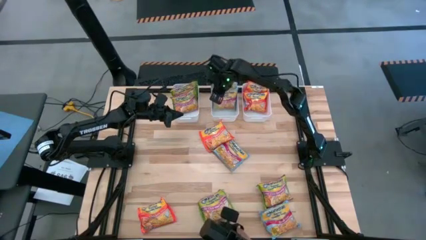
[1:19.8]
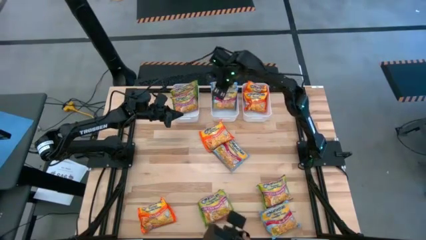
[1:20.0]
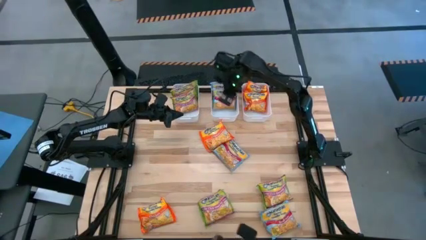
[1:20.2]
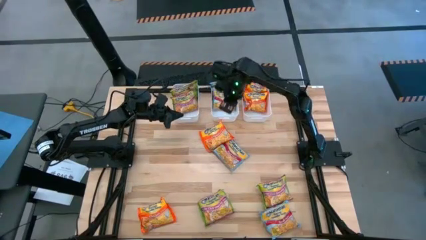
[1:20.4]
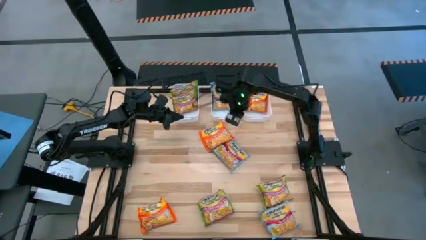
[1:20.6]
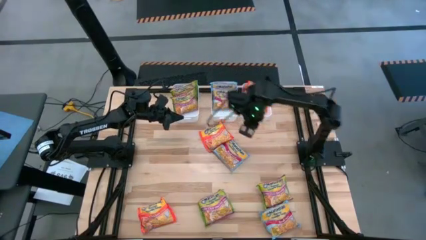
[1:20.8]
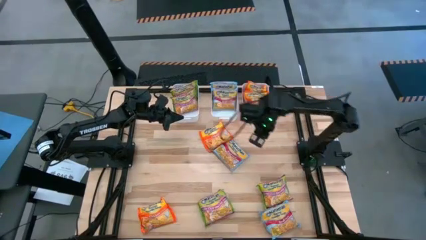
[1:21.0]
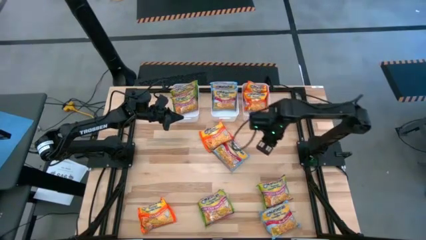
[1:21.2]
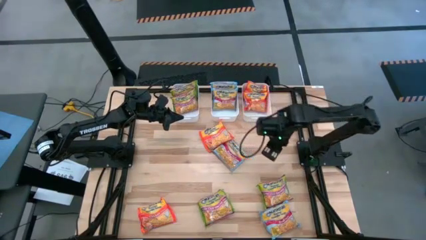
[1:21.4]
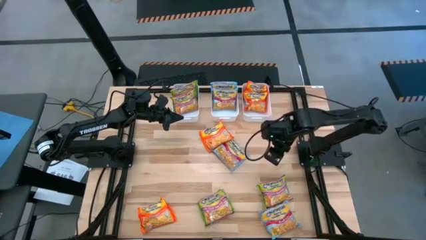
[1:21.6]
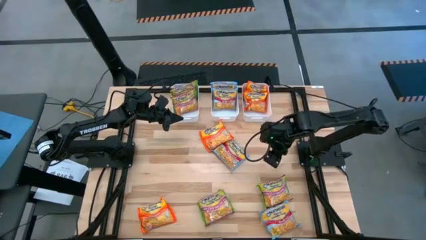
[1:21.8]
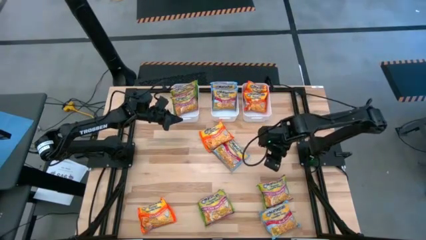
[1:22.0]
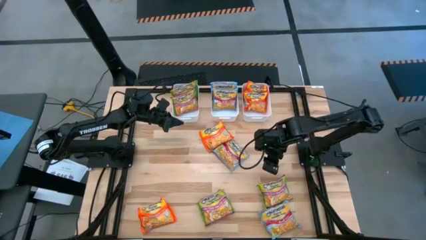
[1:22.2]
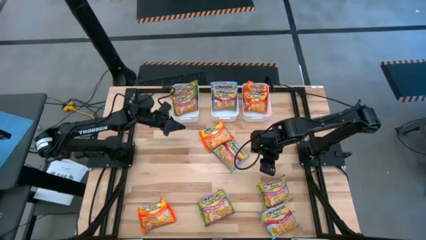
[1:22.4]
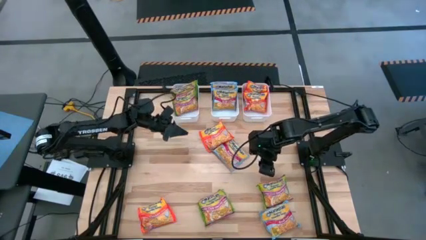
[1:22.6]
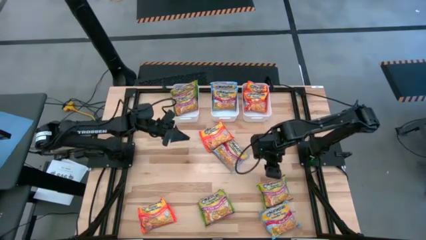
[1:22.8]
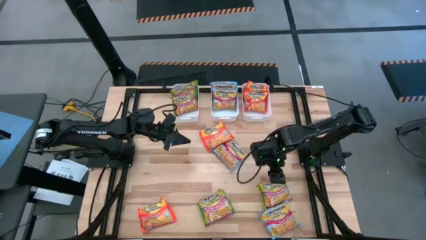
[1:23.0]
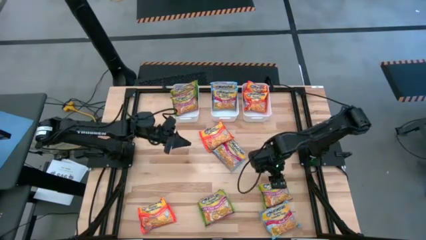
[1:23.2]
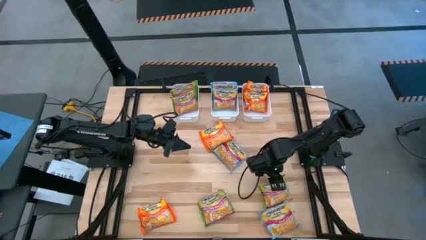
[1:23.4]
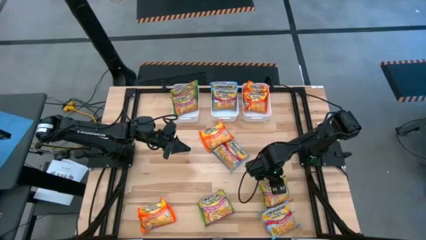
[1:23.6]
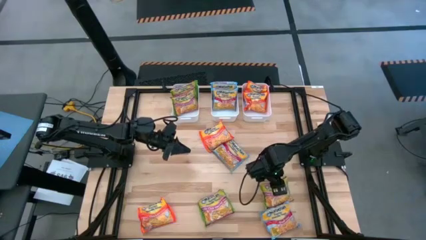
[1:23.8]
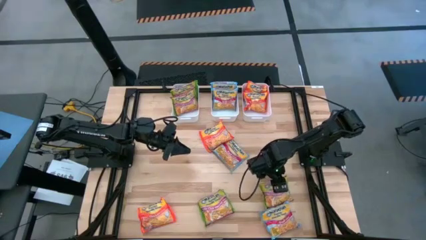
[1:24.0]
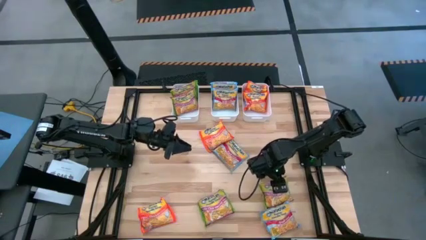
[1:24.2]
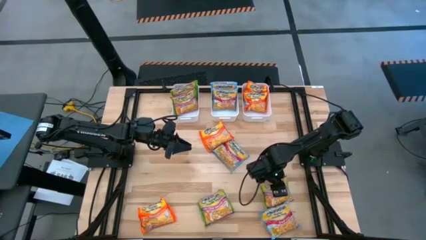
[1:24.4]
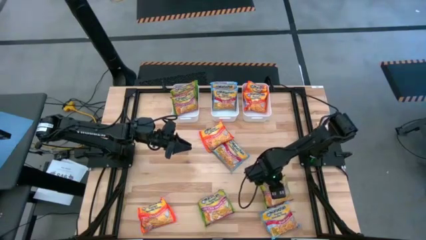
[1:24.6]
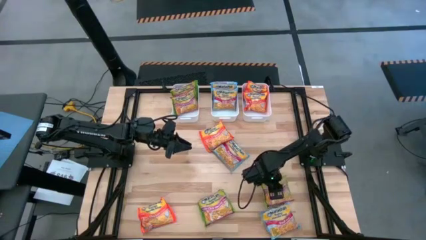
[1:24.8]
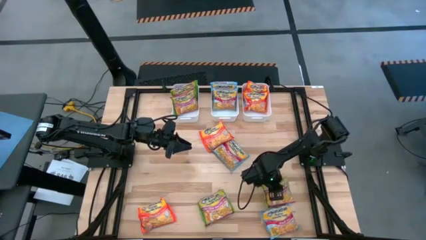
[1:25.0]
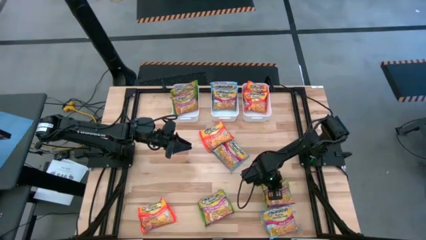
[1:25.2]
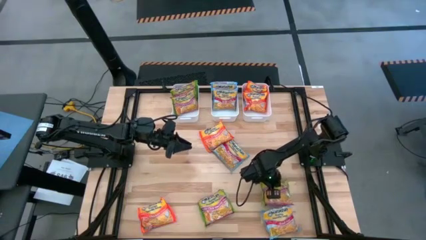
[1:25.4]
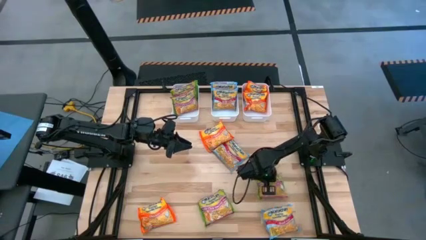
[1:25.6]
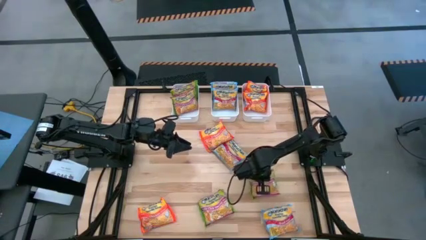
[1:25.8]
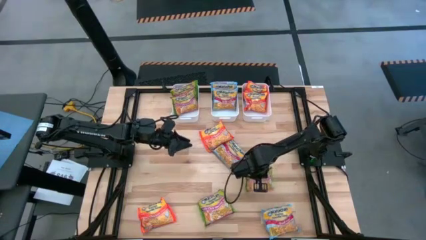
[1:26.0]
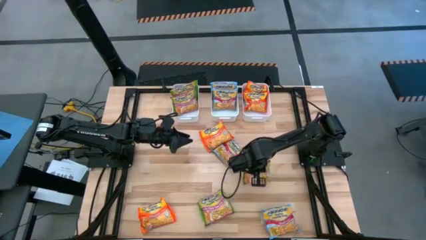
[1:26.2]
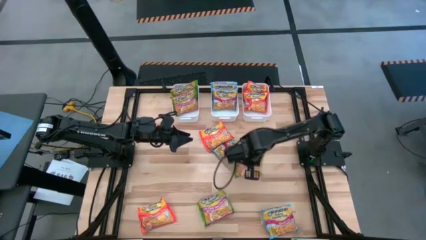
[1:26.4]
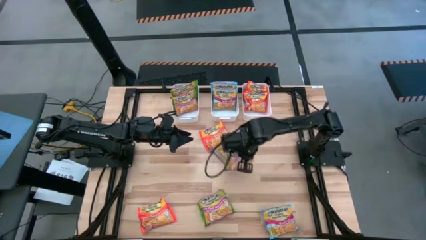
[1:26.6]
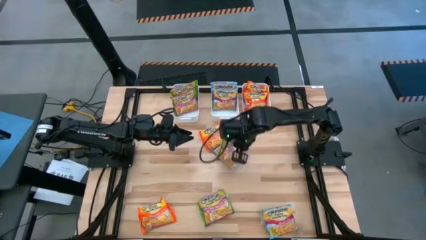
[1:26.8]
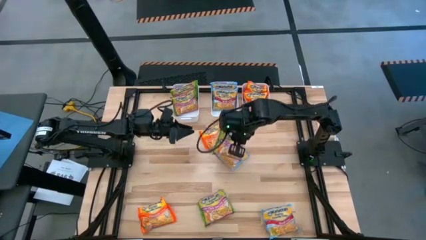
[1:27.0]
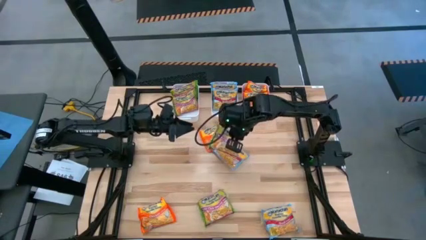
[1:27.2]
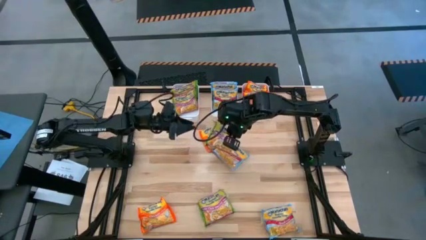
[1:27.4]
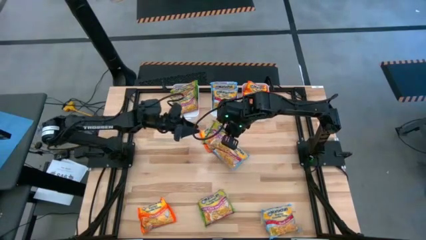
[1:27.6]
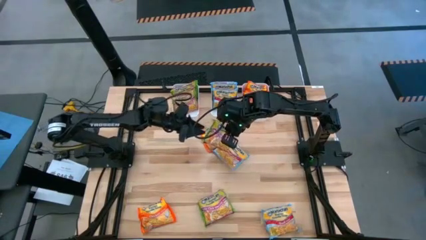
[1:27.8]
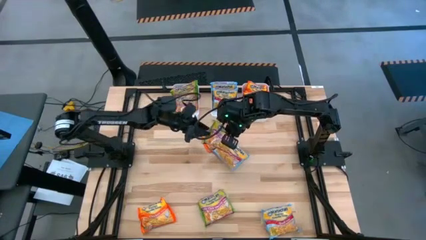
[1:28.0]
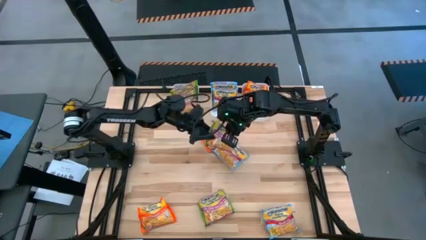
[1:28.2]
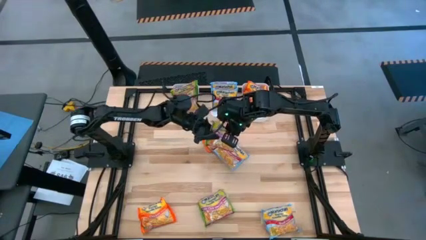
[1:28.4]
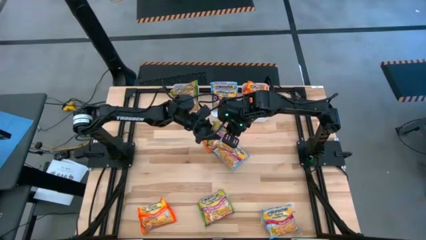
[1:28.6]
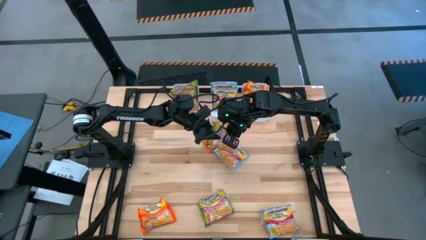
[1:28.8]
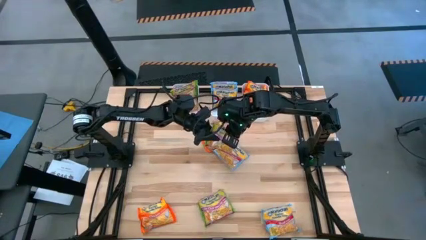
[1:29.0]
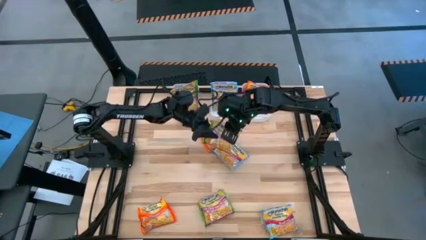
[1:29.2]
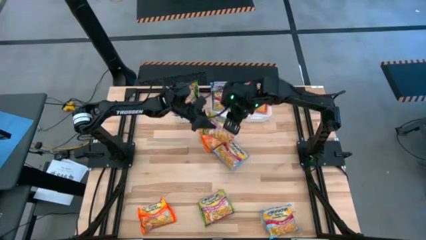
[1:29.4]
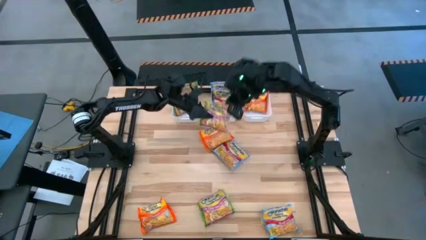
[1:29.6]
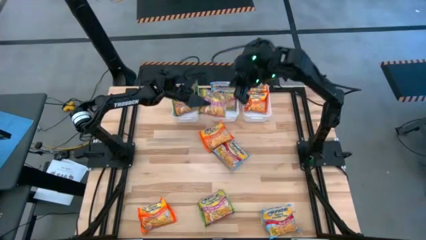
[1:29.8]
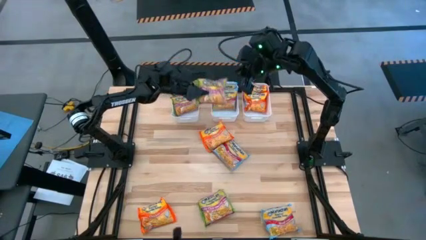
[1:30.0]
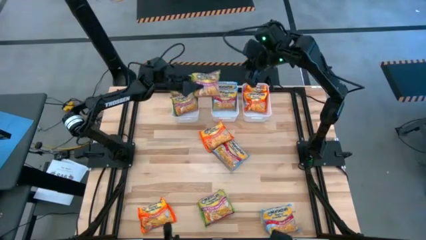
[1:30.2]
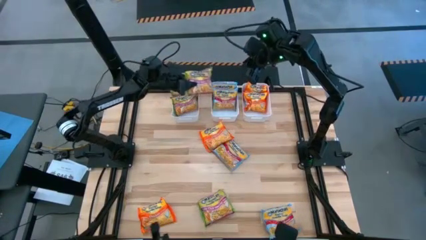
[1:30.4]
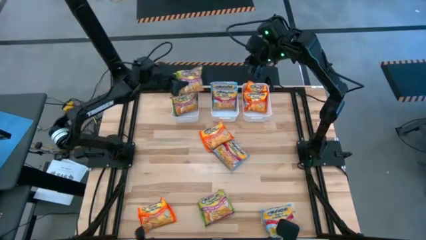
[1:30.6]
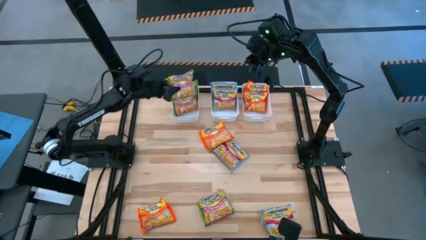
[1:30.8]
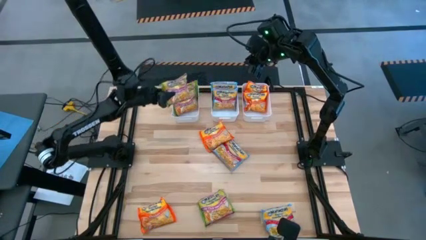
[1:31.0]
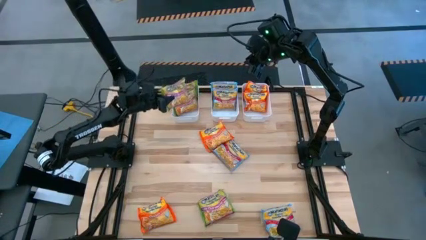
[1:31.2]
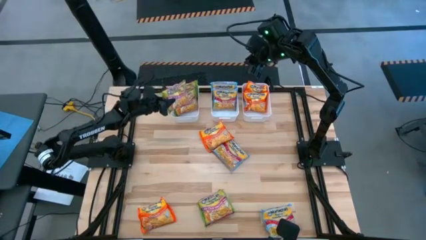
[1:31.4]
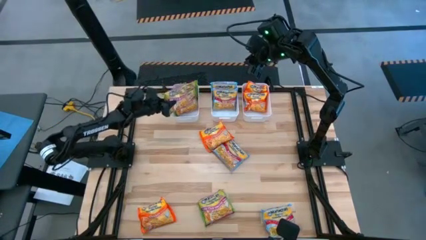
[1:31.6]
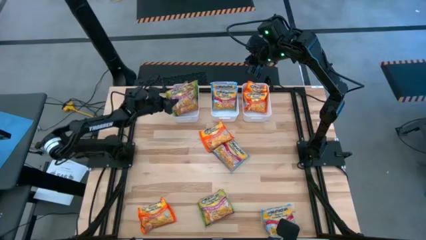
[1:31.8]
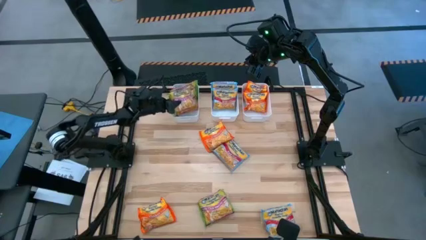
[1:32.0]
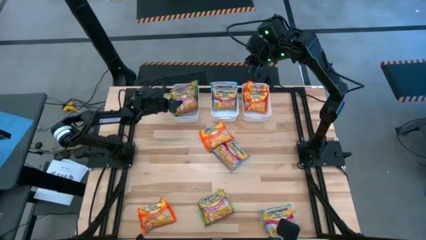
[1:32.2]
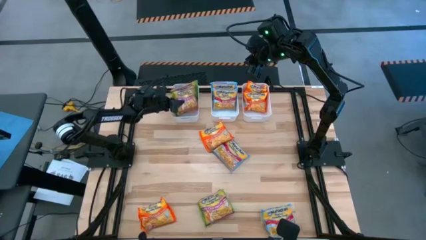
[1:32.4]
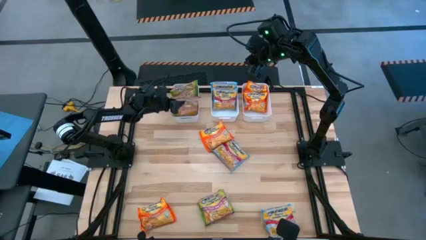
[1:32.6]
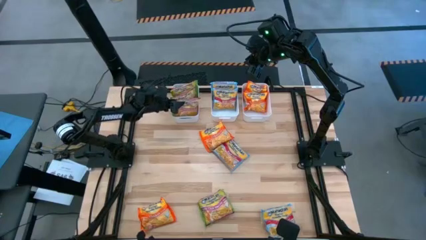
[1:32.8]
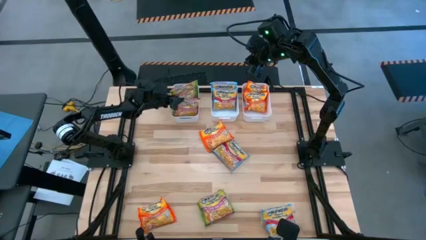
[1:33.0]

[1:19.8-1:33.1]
Task: Sort Maruchan noodles
Put the green noodle pack into the left white bin

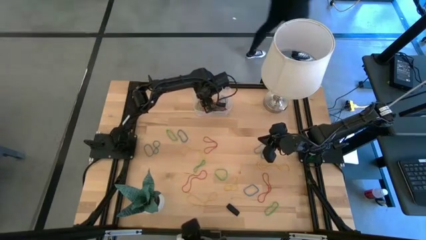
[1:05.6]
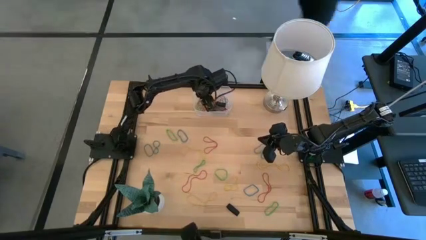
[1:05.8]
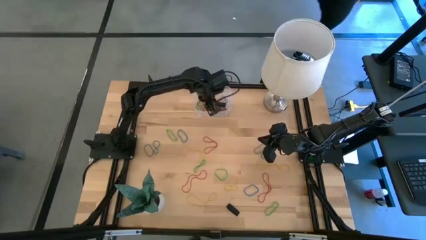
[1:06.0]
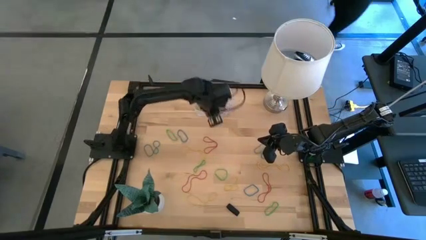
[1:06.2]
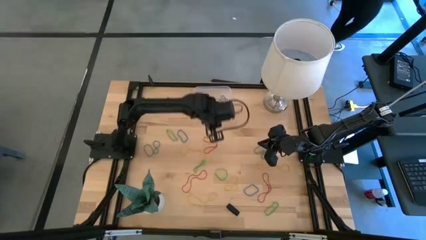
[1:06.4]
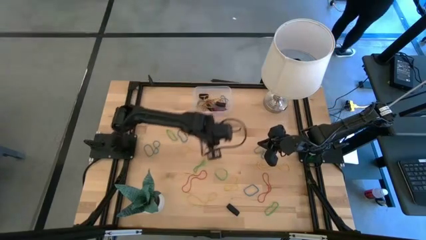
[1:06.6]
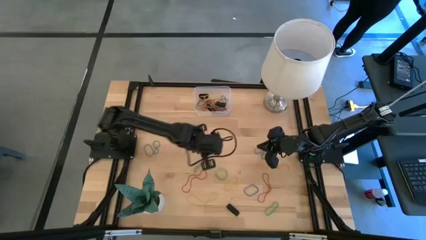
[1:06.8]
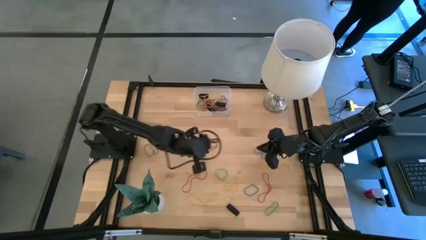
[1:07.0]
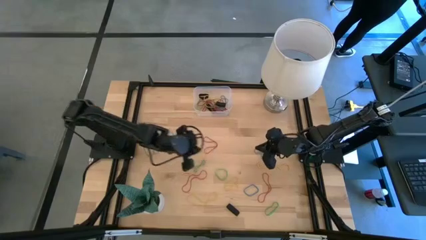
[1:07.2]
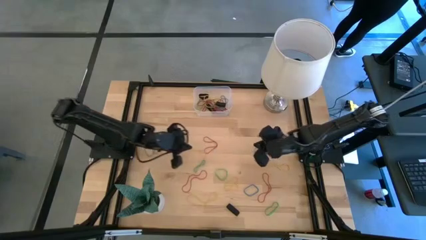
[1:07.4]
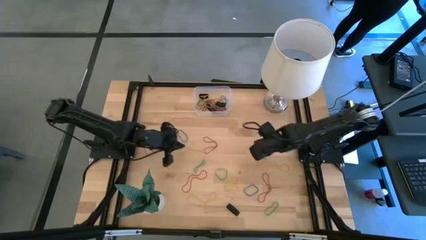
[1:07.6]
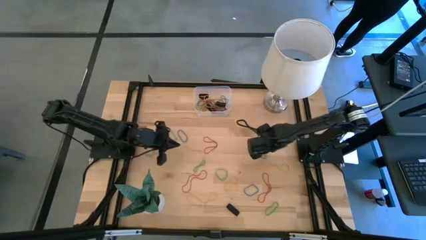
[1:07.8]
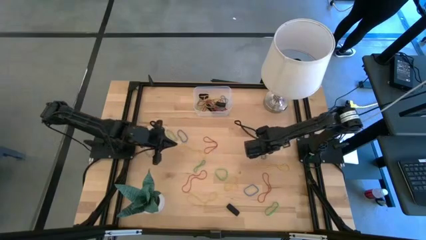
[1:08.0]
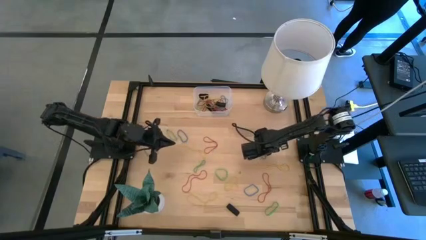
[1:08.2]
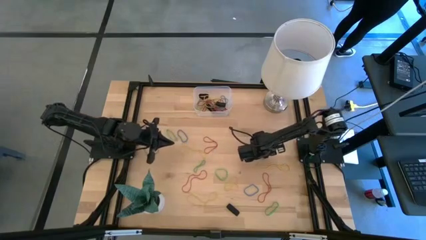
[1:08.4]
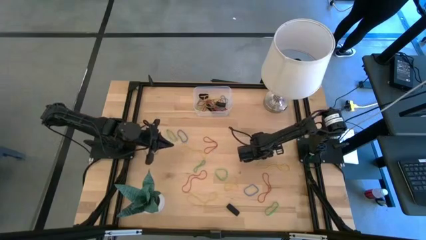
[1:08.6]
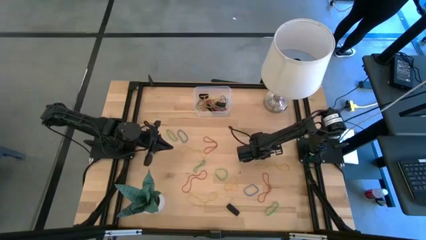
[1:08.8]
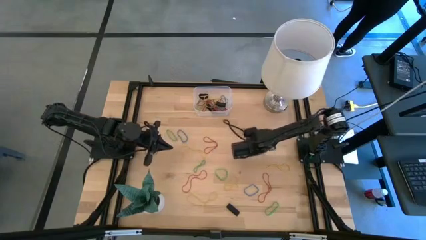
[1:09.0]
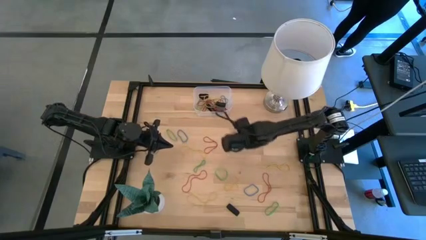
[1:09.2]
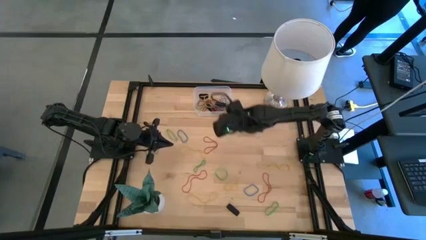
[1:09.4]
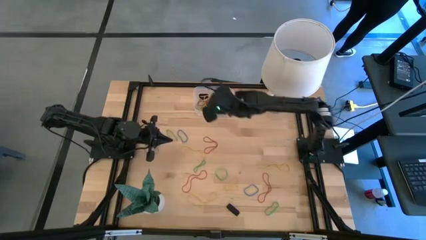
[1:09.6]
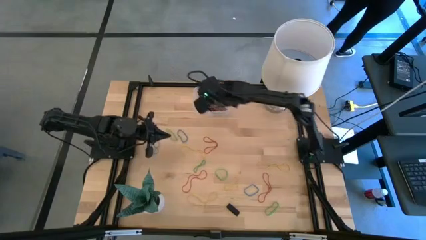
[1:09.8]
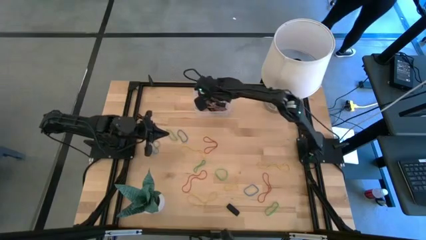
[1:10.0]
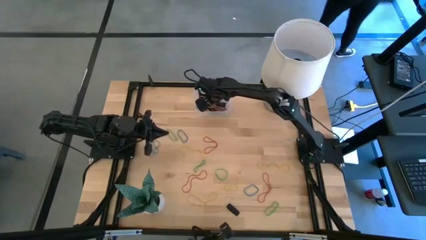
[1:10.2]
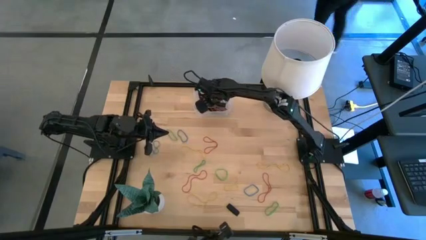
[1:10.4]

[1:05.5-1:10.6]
Task: Pick and place rubber bands into bin
Put the blue rubber band into the transparent bin
